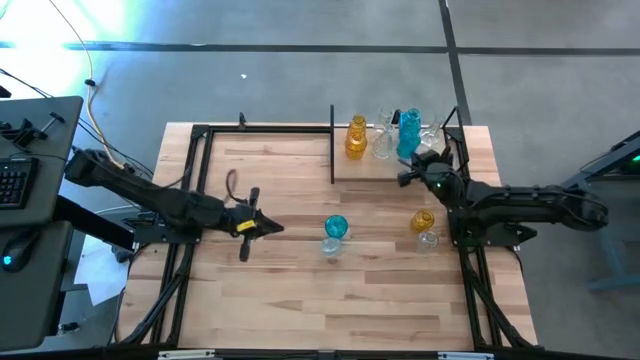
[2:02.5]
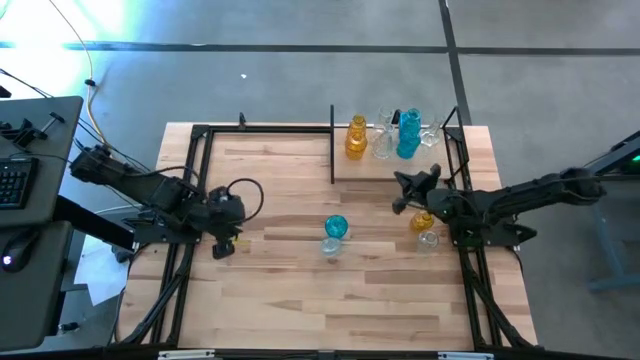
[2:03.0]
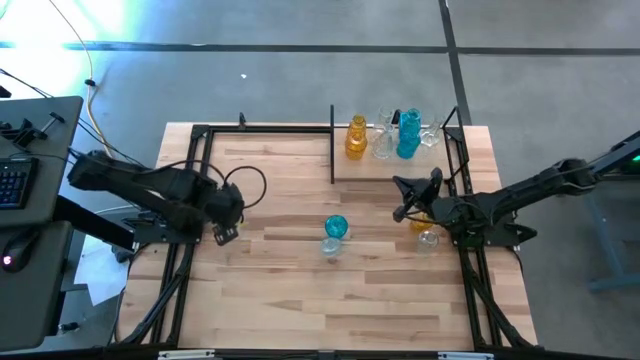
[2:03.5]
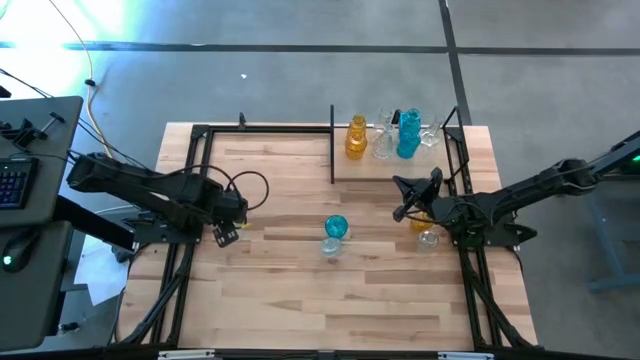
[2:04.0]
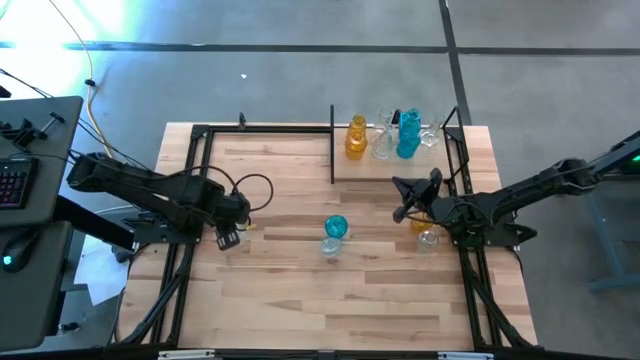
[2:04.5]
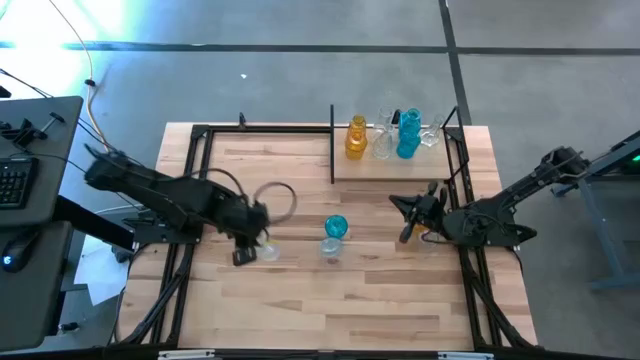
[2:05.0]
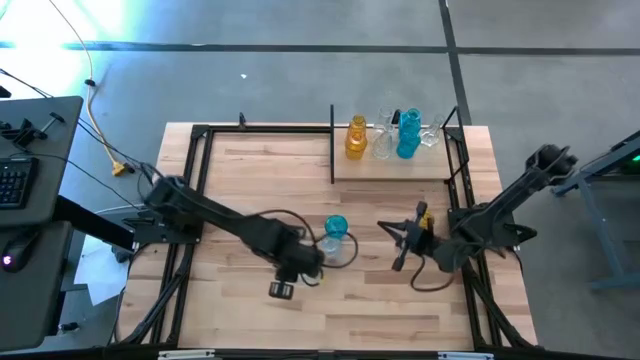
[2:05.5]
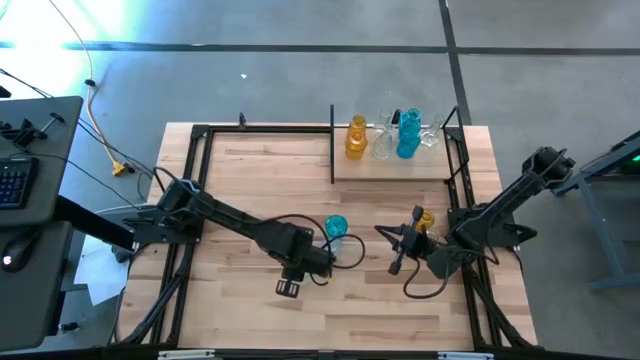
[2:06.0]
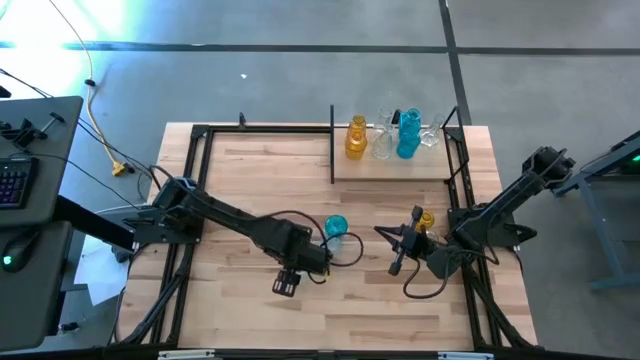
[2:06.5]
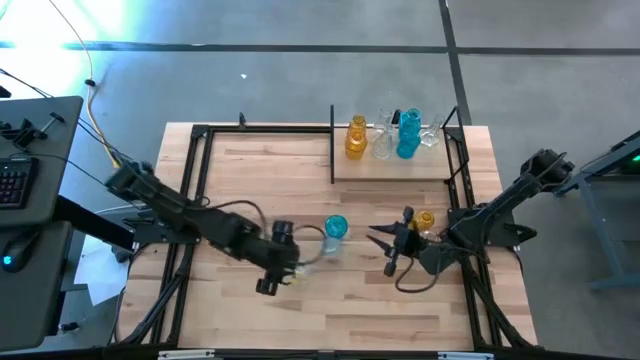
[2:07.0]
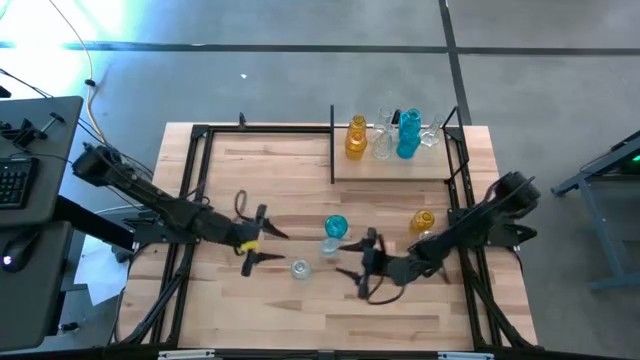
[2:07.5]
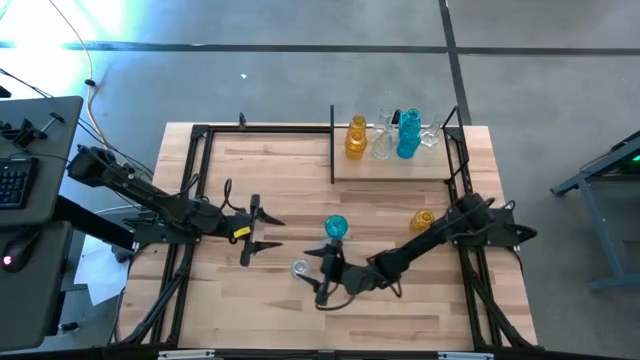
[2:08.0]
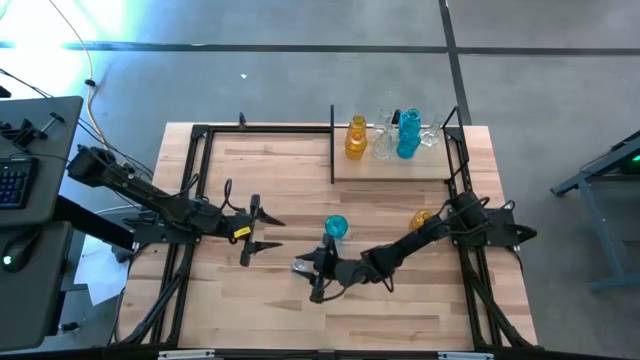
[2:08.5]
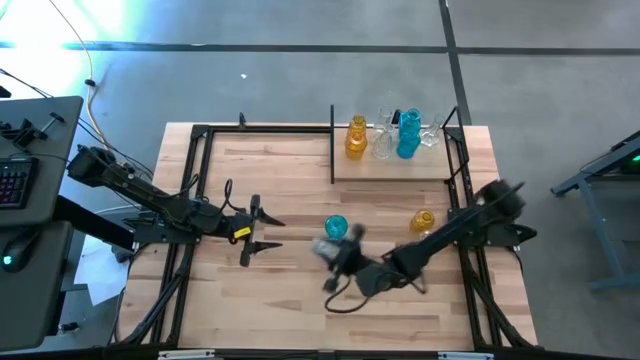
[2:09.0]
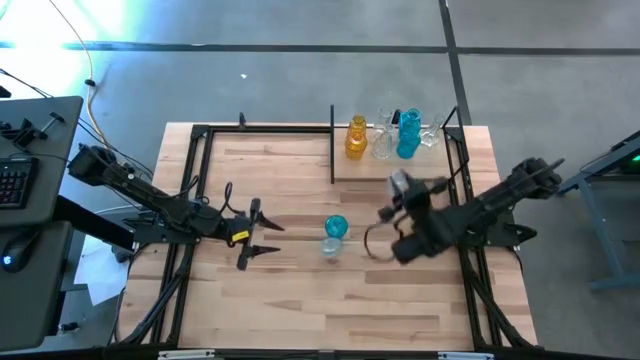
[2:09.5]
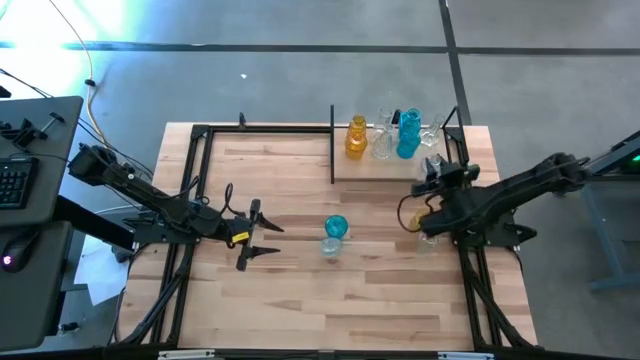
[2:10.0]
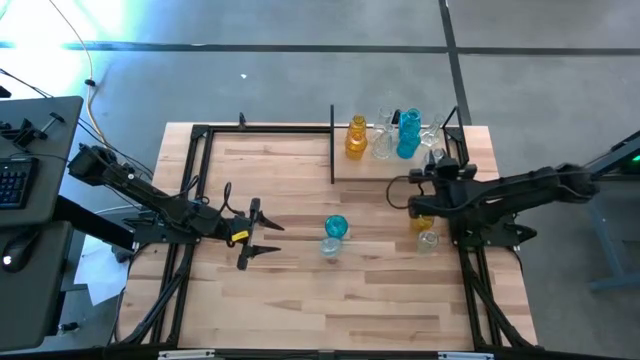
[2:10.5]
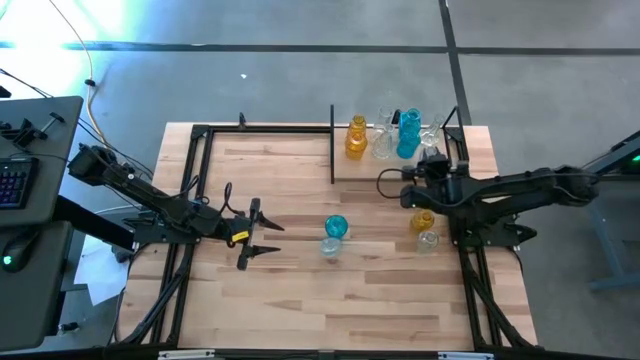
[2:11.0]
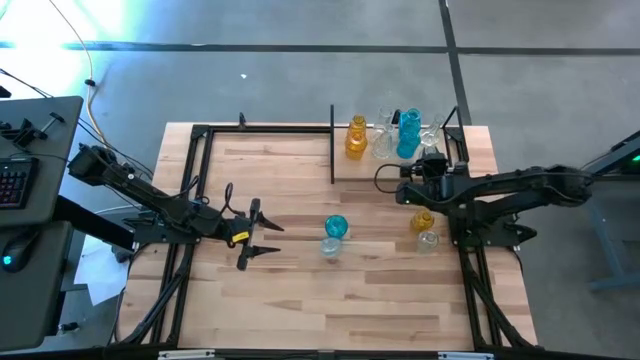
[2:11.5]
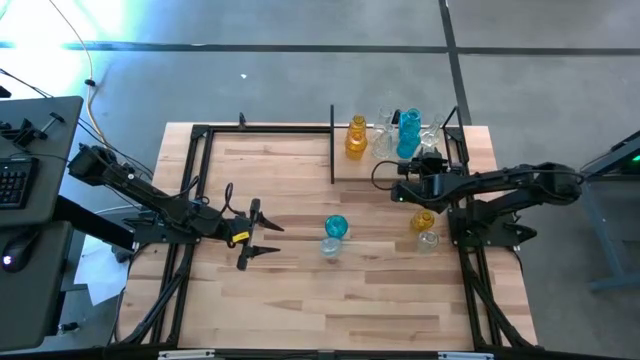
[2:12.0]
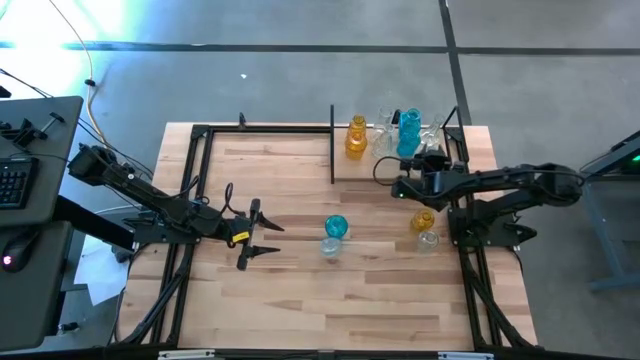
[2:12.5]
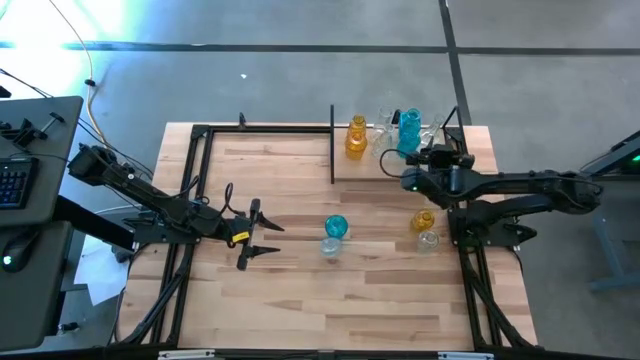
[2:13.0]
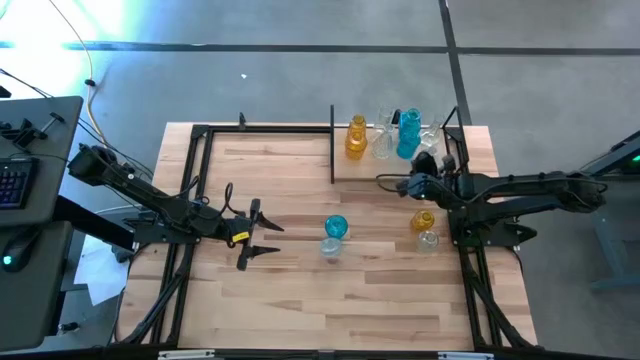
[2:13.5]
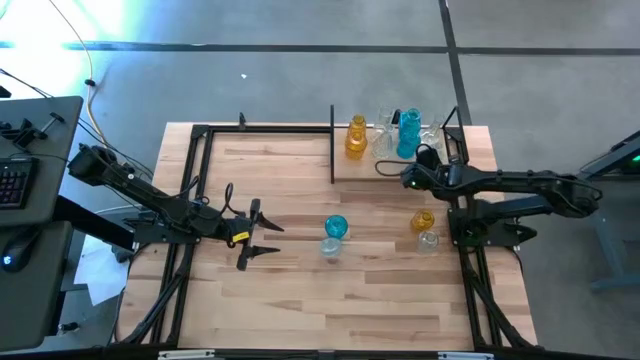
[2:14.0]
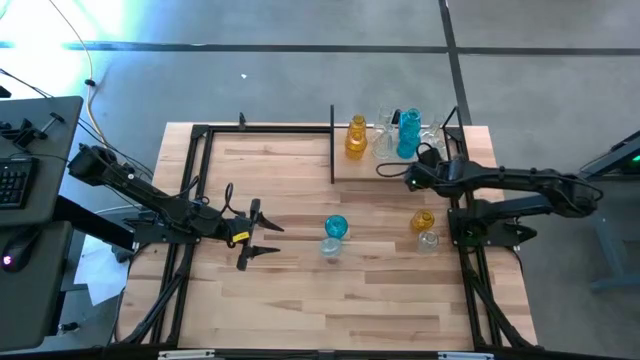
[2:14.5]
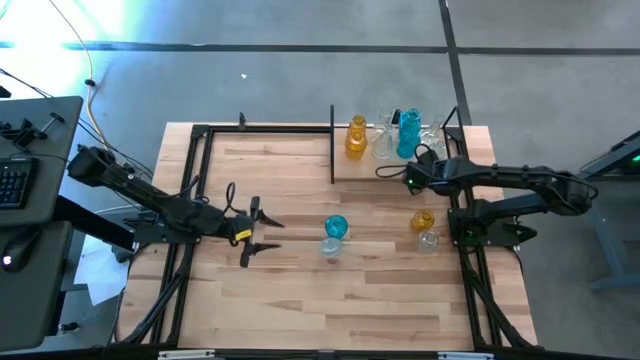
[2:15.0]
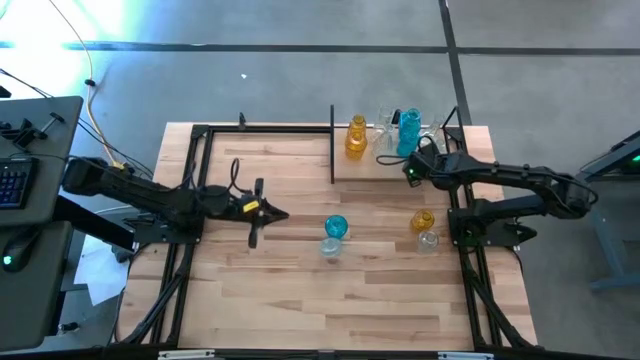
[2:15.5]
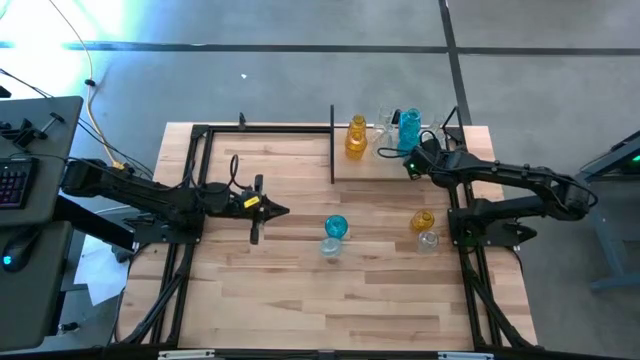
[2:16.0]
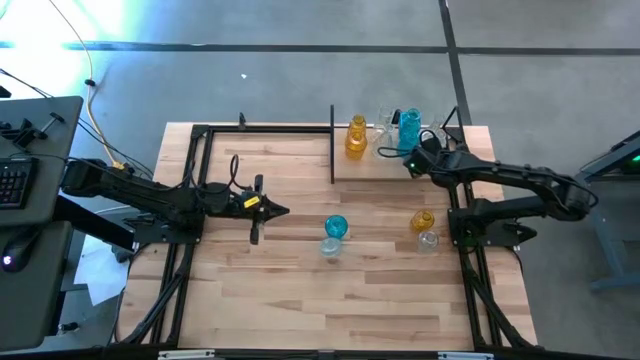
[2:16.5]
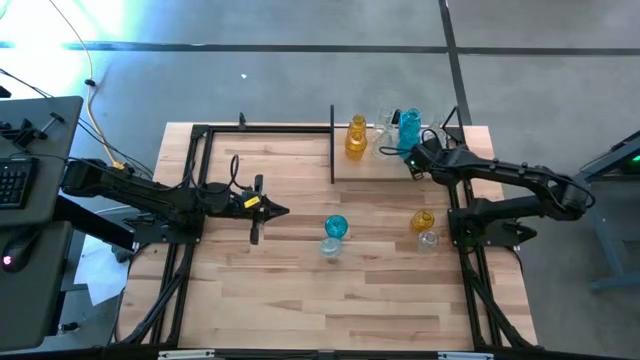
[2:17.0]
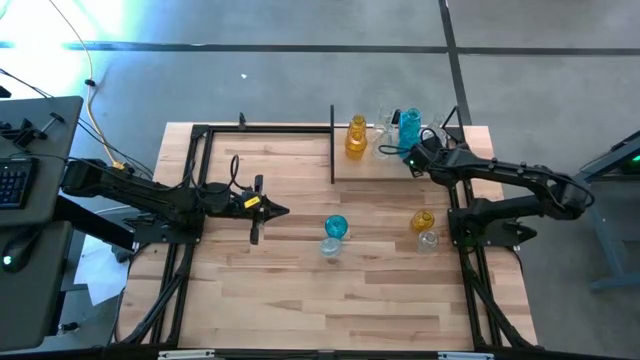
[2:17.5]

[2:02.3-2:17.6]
Task: sort vases onto shelf
Put the left transparent vase on the shelf aligned with the other transparent vase

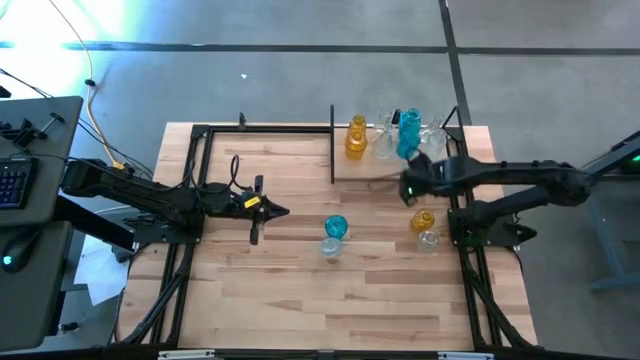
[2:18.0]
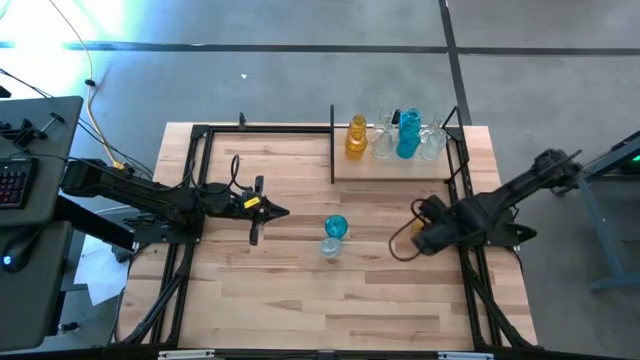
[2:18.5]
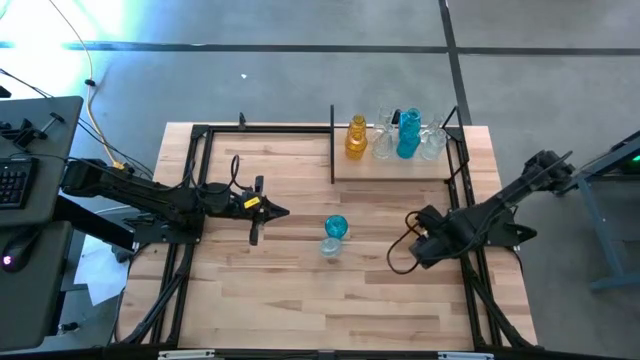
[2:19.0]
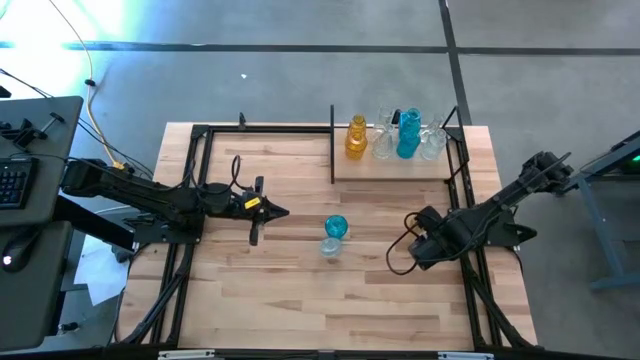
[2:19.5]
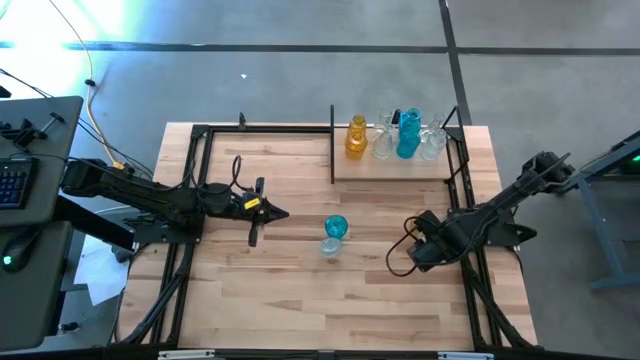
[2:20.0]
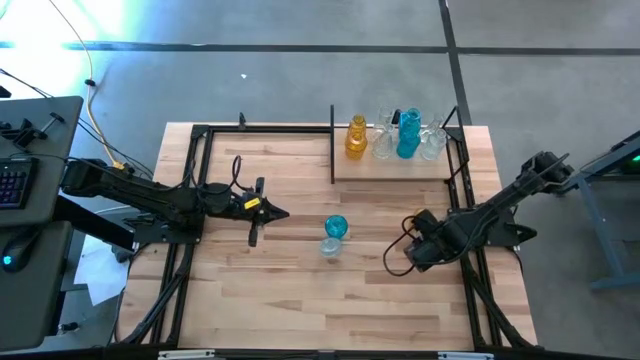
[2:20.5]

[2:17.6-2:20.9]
Put the right transparent vase on the shelf aligned with the other transparent vase
